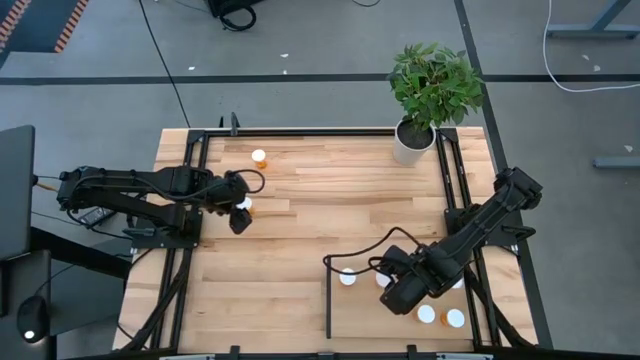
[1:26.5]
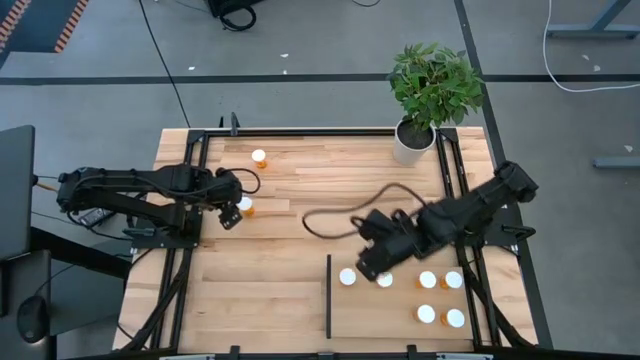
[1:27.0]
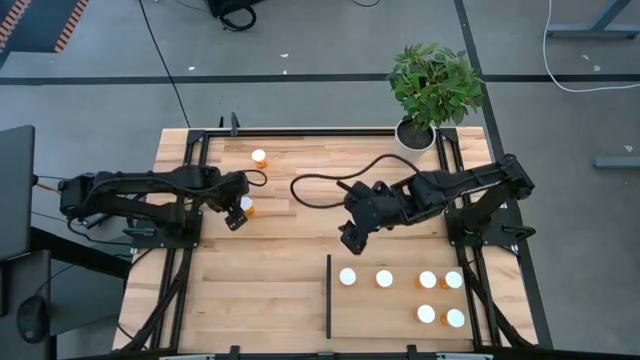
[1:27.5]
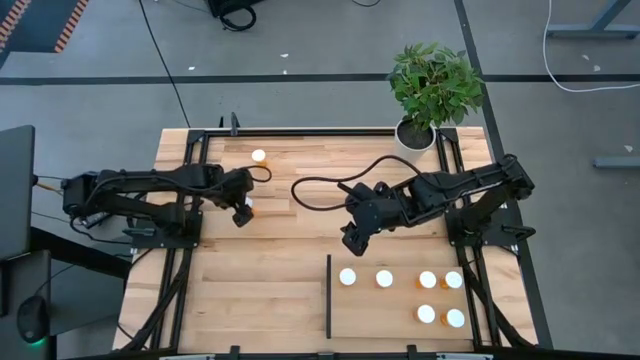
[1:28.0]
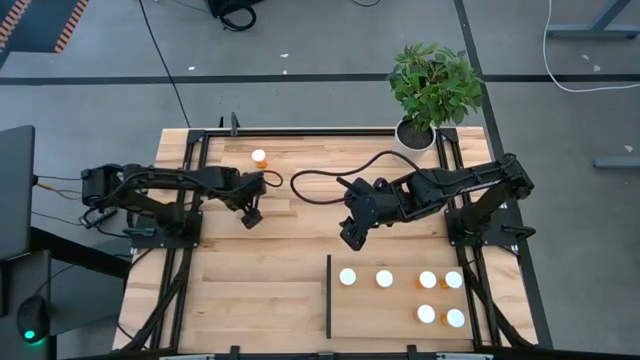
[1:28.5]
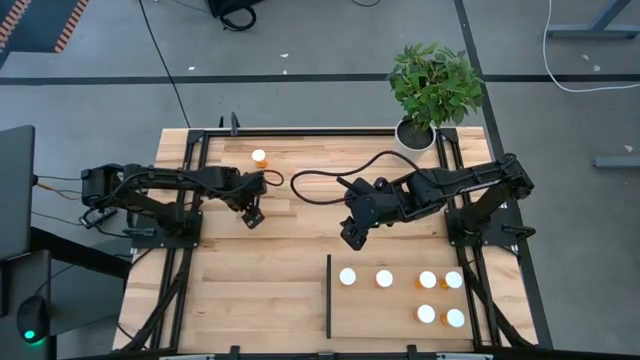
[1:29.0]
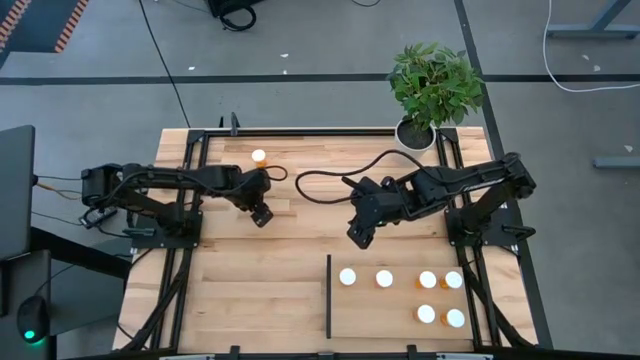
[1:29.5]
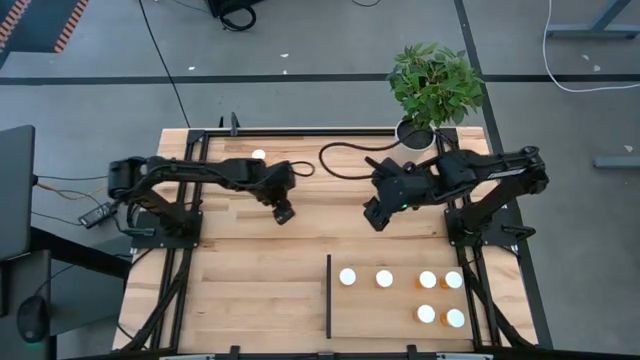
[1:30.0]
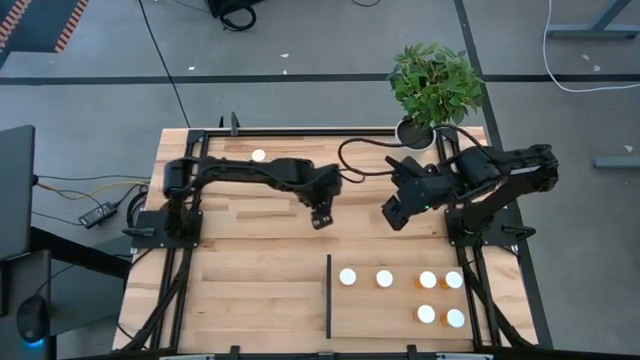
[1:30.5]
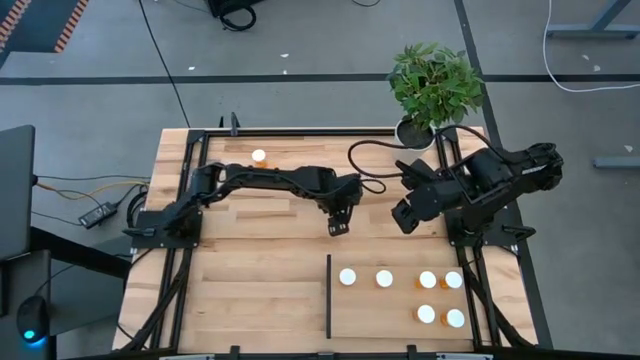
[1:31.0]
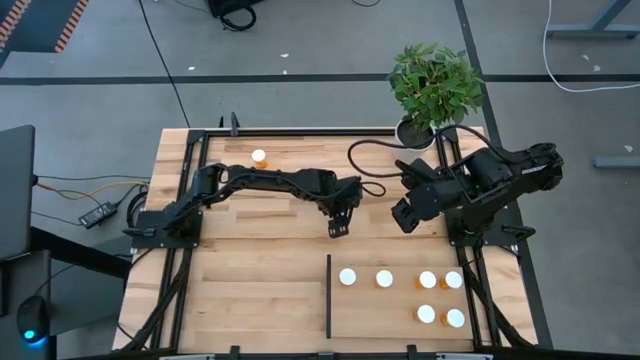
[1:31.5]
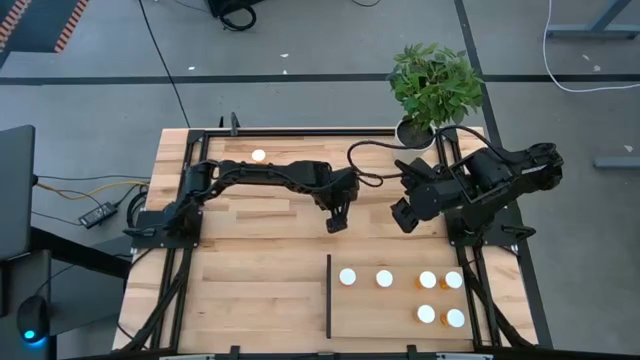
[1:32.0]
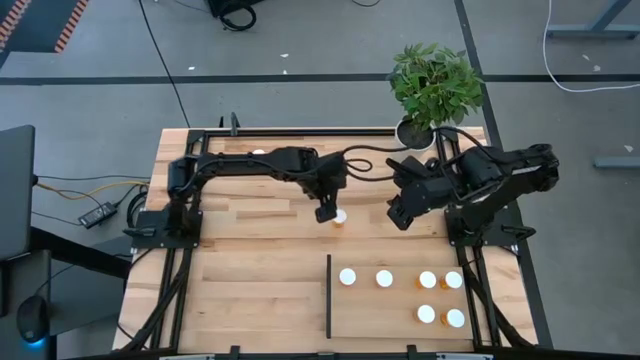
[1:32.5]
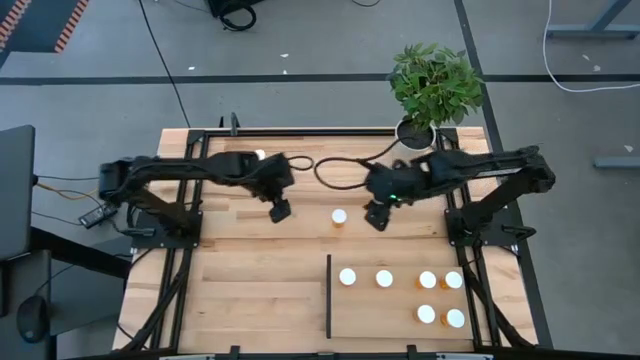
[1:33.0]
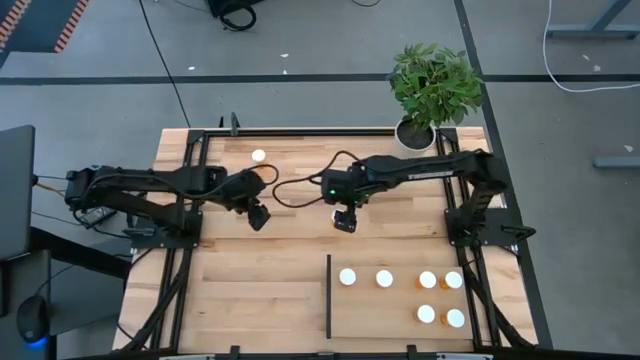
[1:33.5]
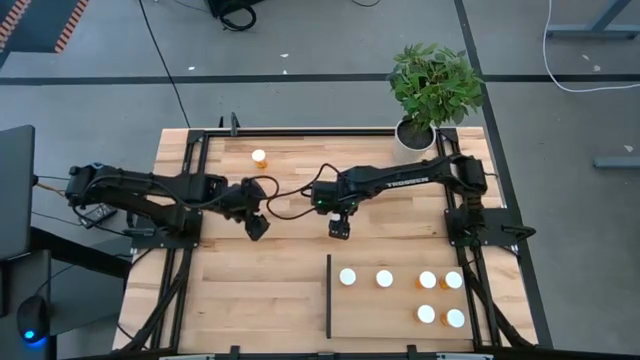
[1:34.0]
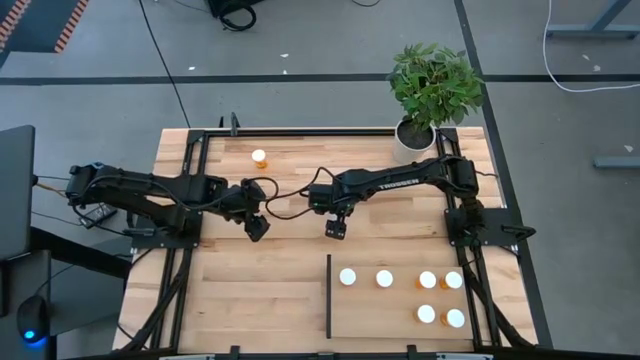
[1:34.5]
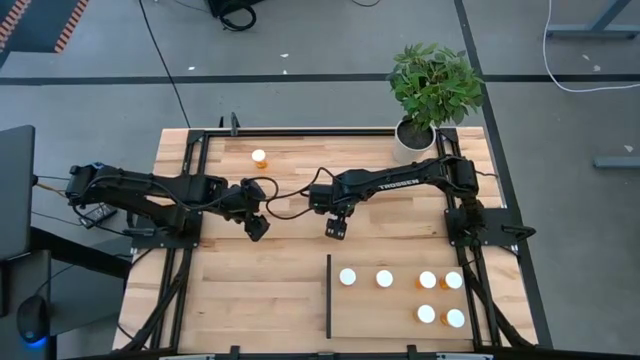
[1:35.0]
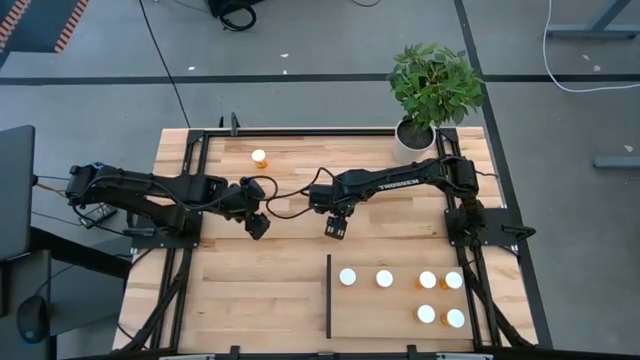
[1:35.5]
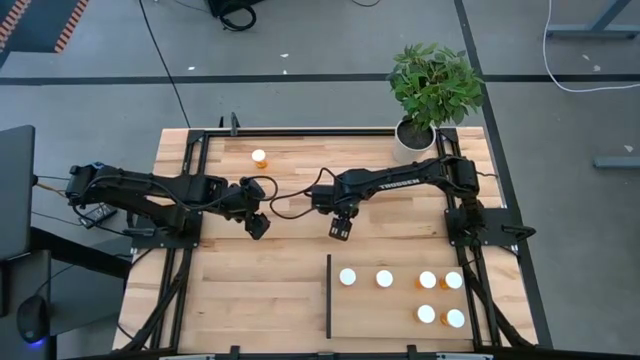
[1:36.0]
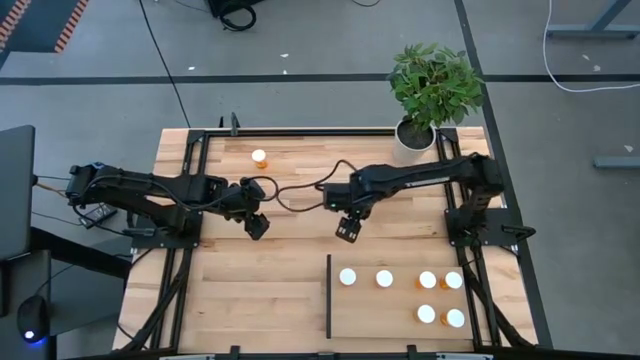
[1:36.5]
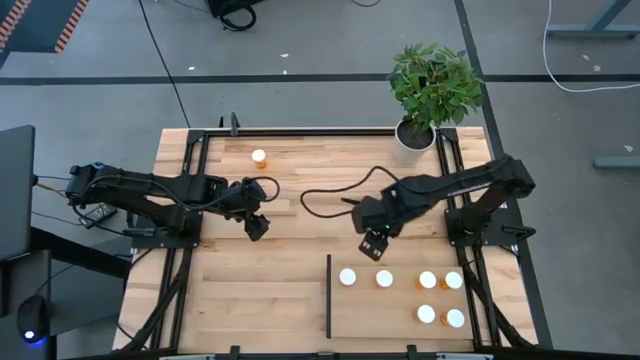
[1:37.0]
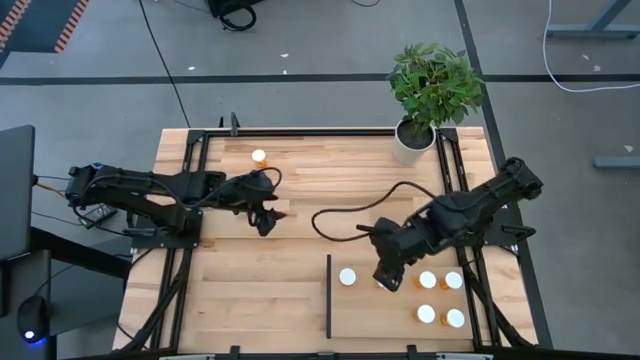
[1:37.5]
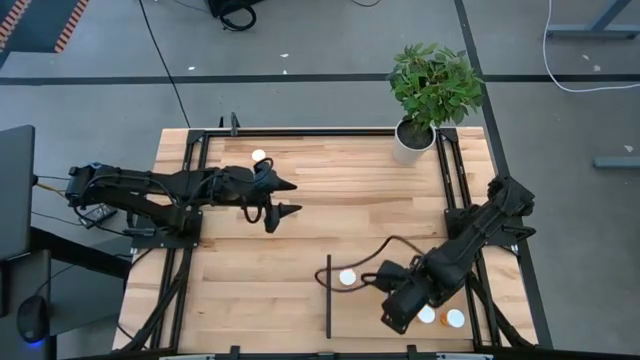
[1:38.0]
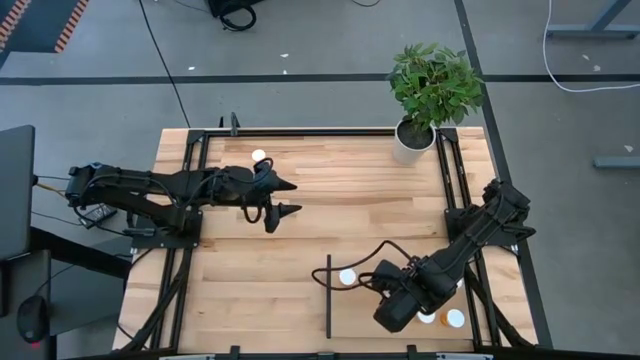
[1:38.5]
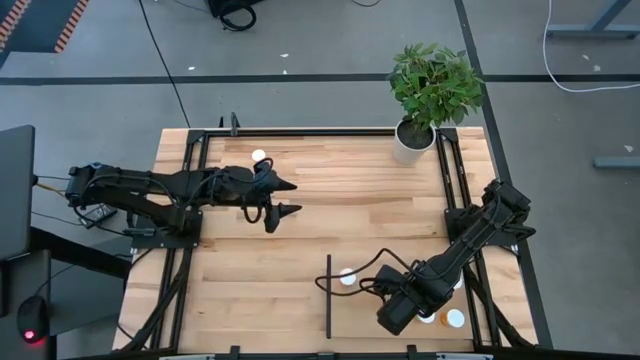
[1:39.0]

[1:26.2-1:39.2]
Task: Pick and place medicine bottles onto shelf by color
Put the orange pill bottle on the shelf aligned with the other orange pill bottles

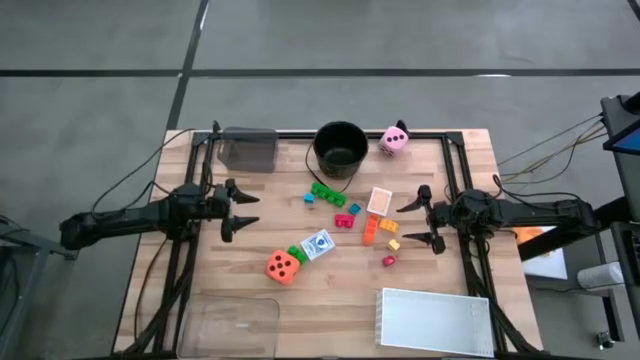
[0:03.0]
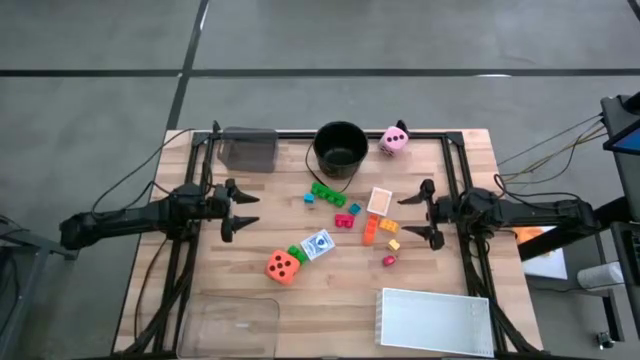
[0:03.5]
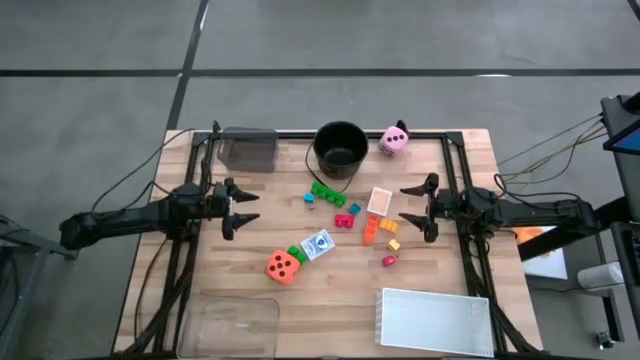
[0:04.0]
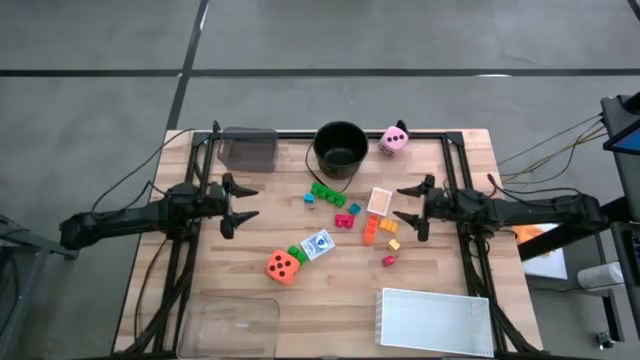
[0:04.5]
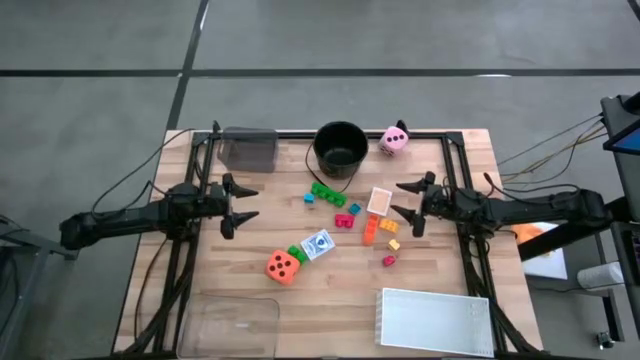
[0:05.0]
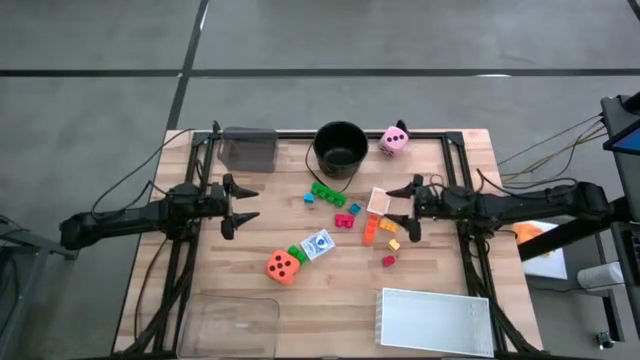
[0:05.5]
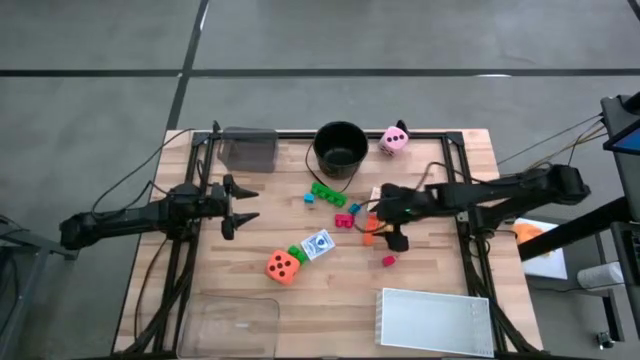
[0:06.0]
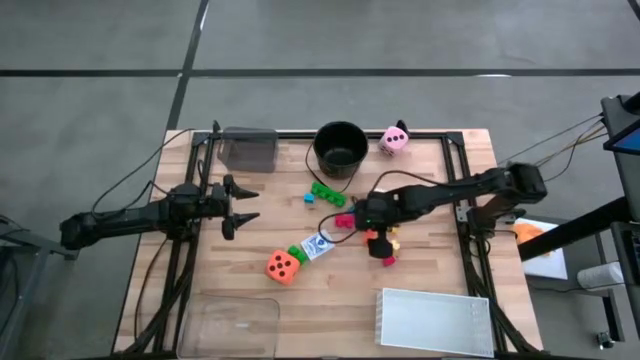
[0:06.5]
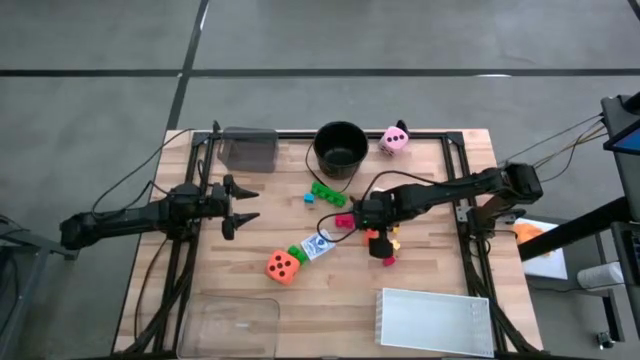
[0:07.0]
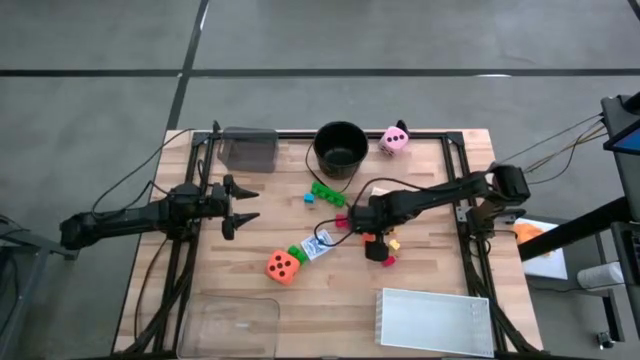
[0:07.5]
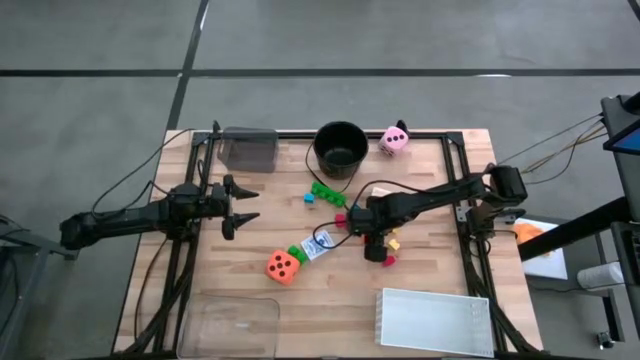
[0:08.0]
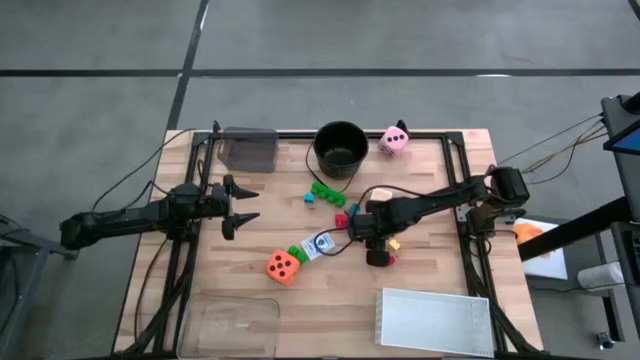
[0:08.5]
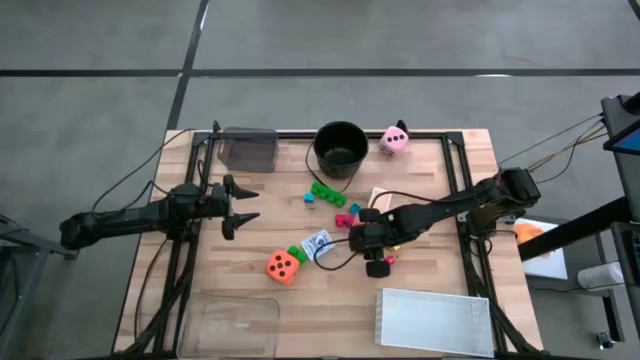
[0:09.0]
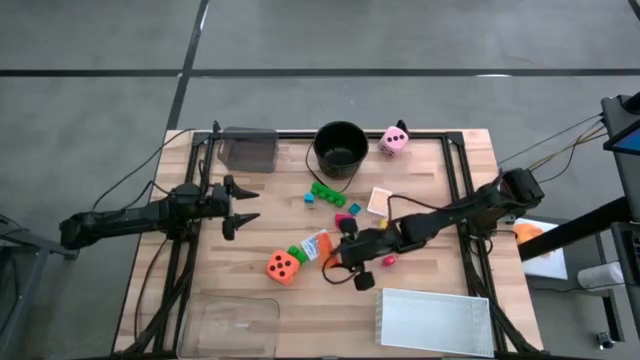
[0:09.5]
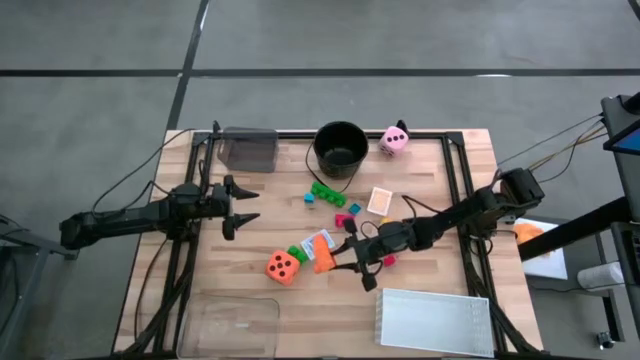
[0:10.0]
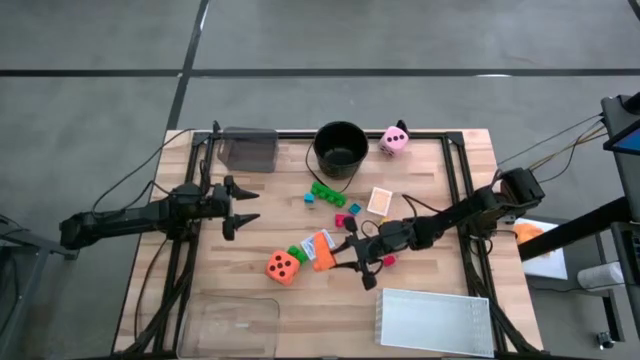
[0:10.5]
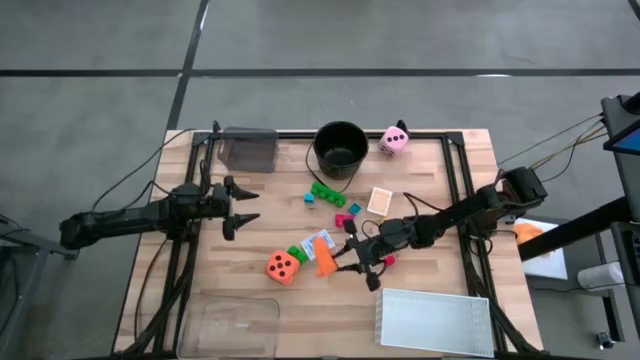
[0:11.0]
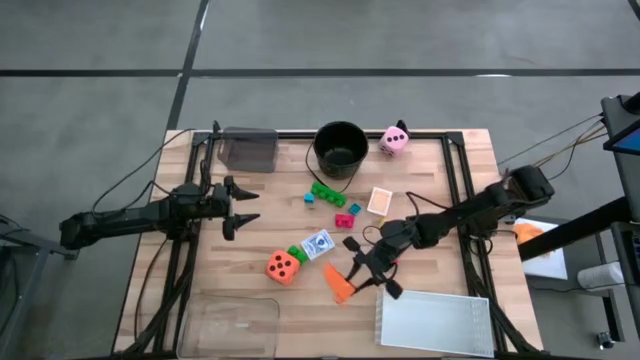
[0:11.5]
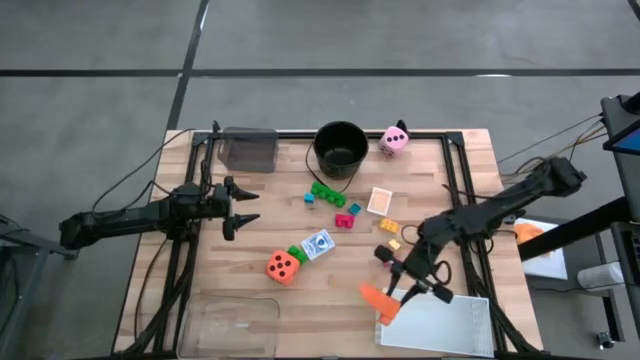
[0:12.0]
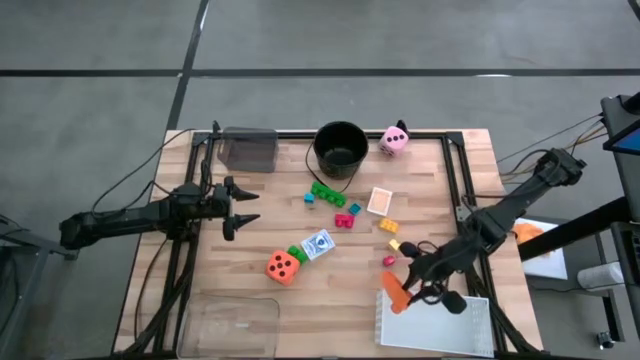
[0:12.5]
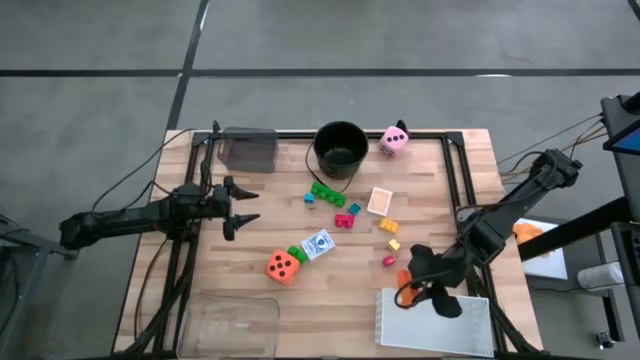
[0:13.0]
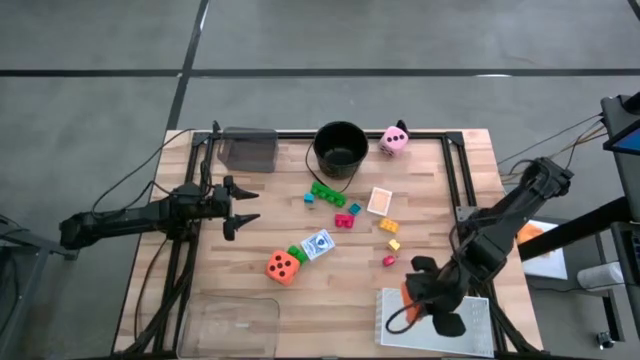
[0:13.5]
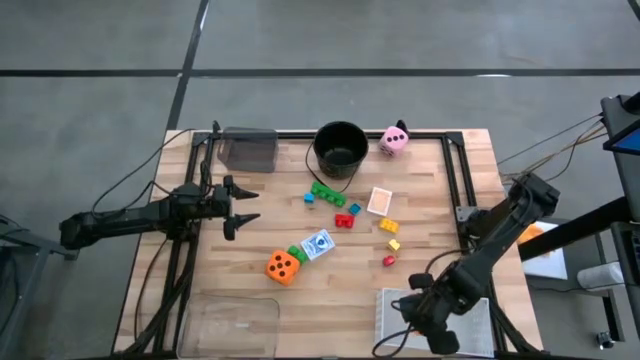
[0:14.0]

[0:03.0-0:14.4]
Task: Pick & Place Toys
Put the orange game piece into the white bin
